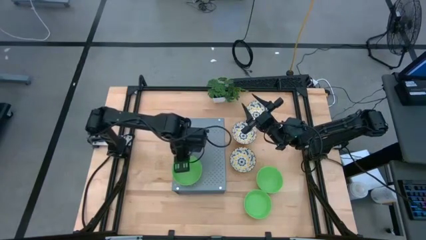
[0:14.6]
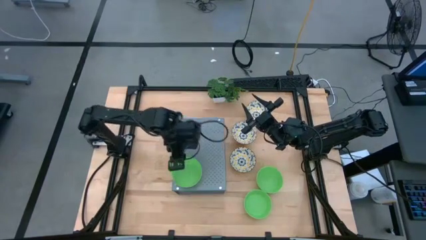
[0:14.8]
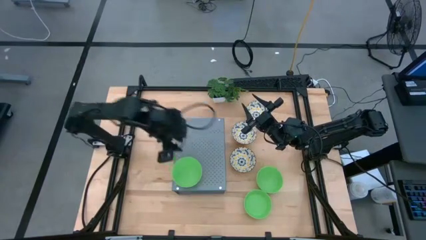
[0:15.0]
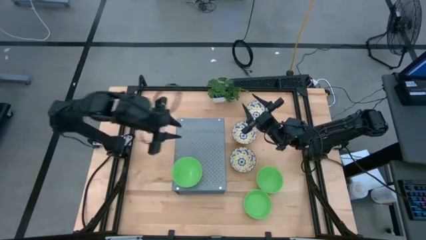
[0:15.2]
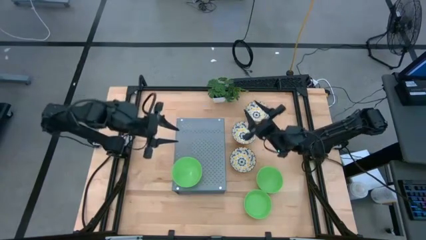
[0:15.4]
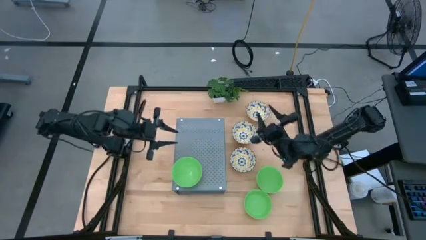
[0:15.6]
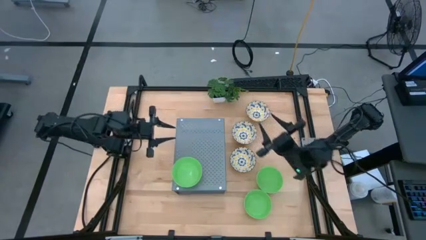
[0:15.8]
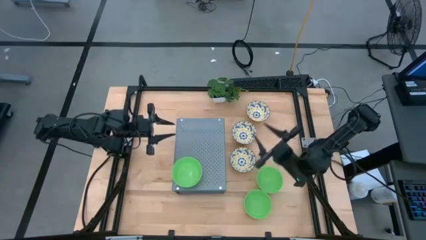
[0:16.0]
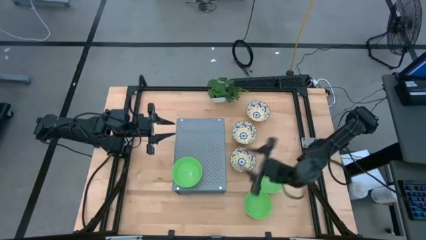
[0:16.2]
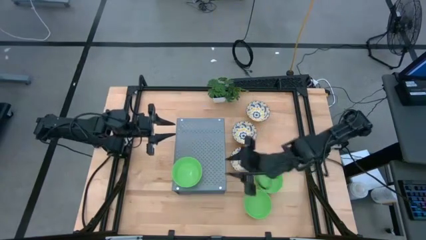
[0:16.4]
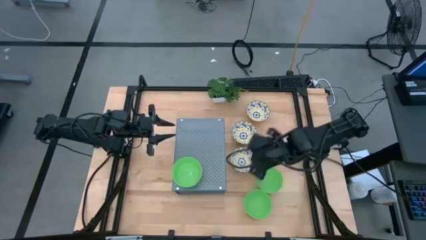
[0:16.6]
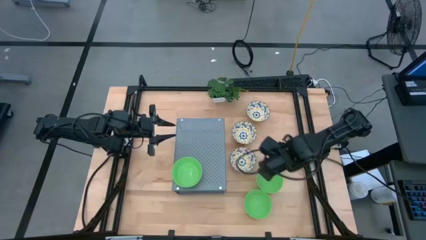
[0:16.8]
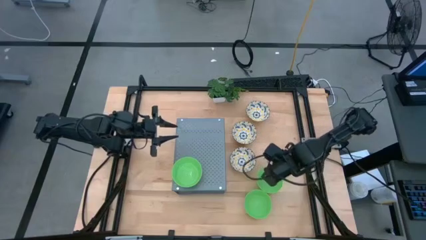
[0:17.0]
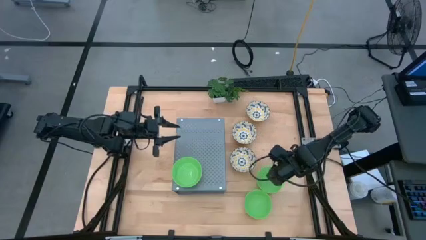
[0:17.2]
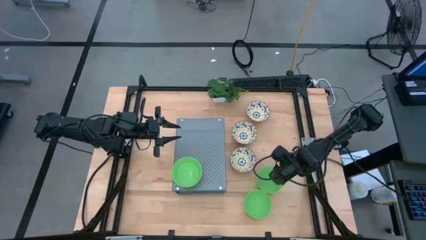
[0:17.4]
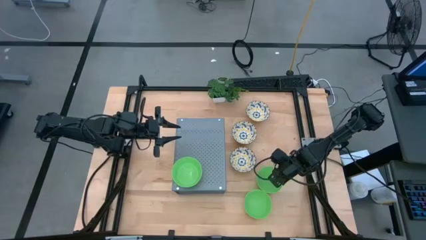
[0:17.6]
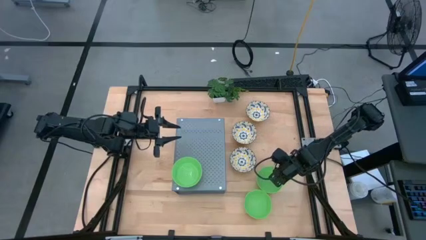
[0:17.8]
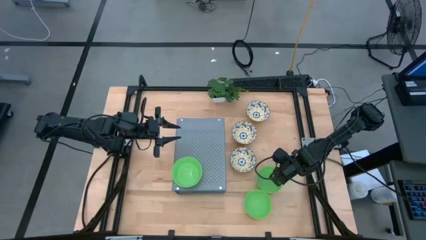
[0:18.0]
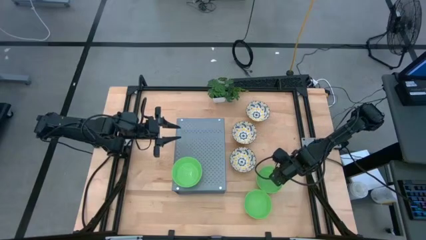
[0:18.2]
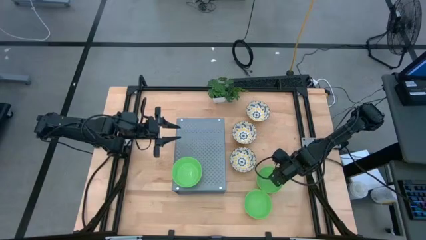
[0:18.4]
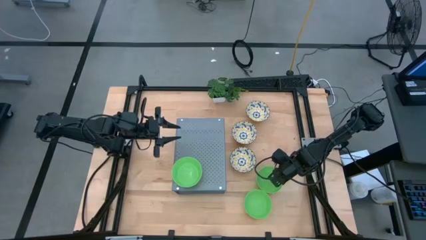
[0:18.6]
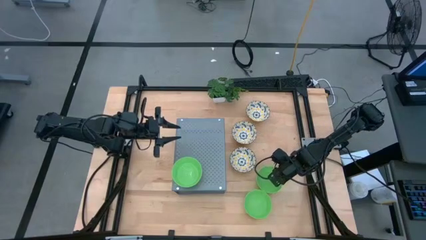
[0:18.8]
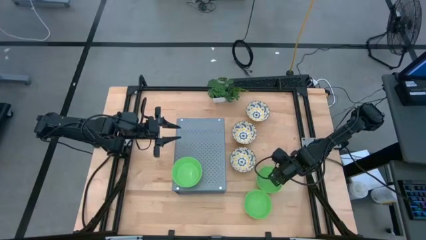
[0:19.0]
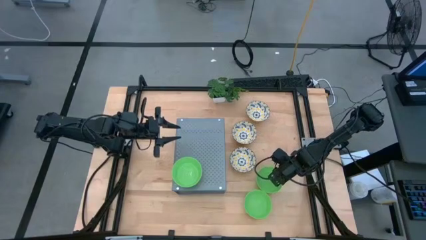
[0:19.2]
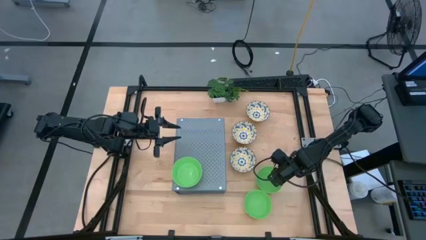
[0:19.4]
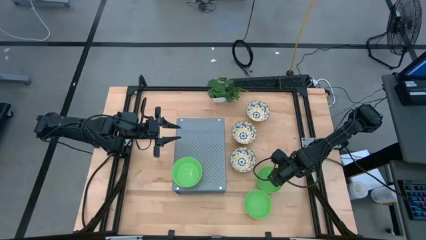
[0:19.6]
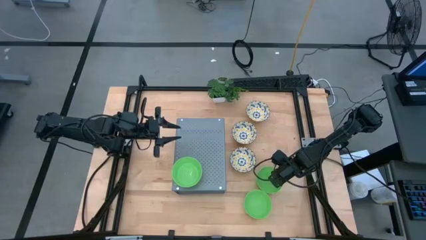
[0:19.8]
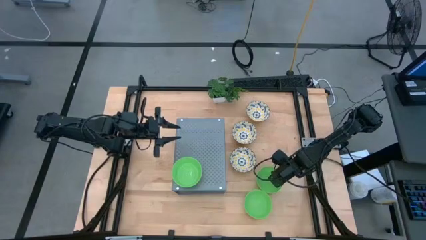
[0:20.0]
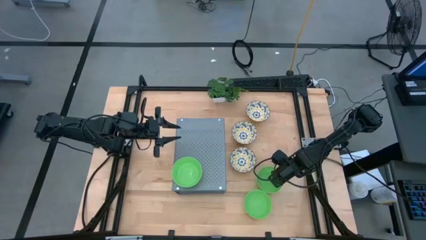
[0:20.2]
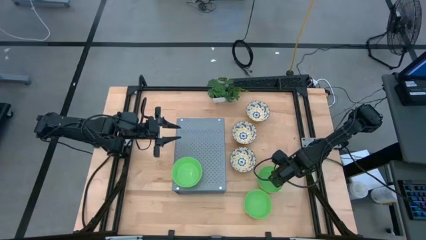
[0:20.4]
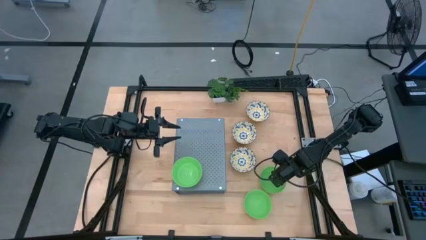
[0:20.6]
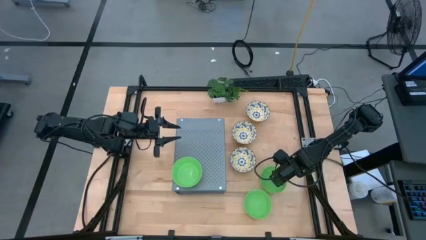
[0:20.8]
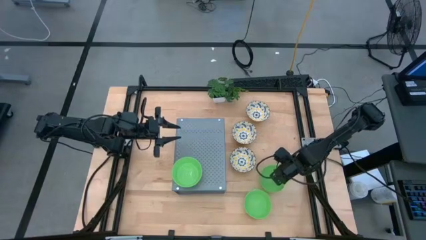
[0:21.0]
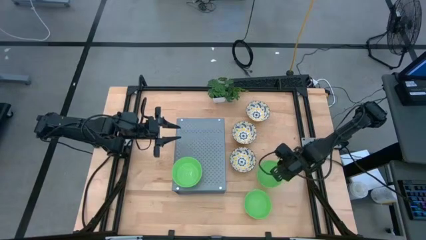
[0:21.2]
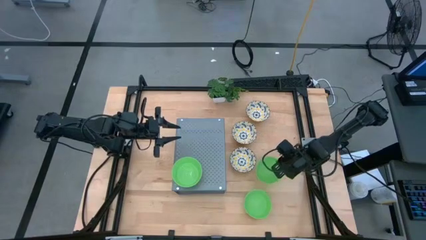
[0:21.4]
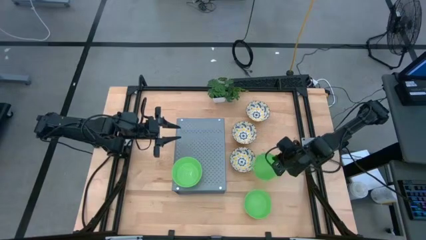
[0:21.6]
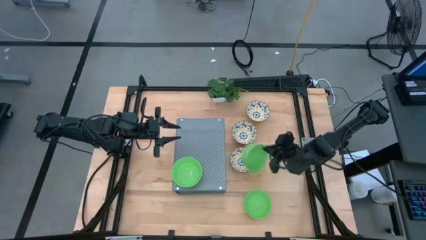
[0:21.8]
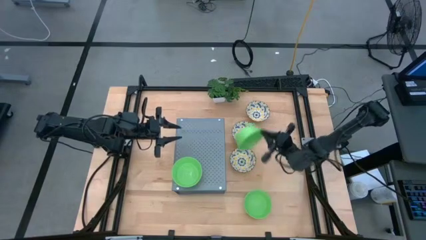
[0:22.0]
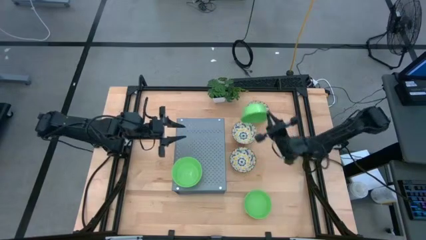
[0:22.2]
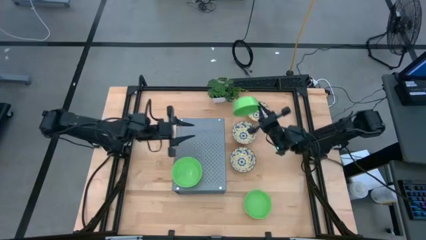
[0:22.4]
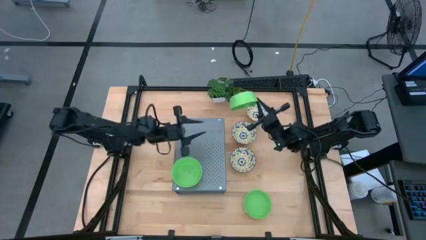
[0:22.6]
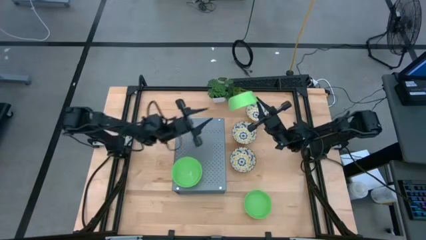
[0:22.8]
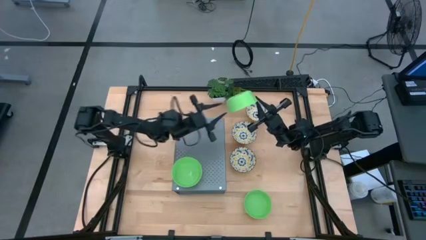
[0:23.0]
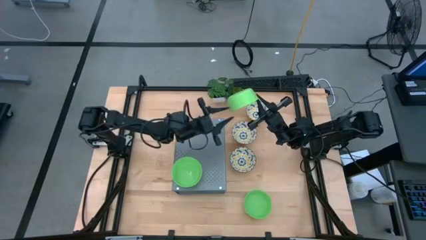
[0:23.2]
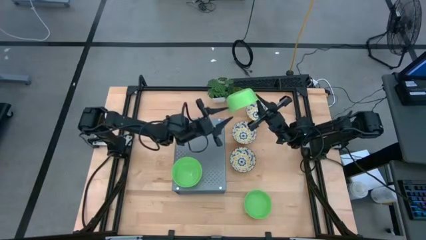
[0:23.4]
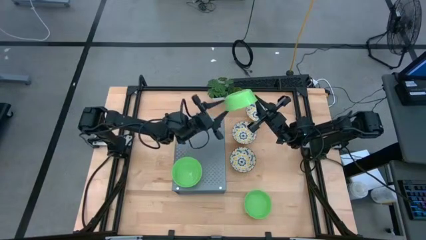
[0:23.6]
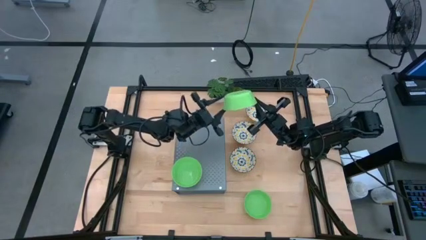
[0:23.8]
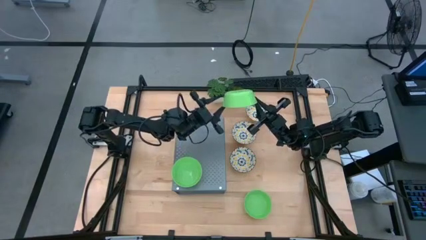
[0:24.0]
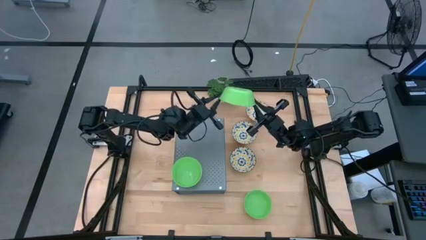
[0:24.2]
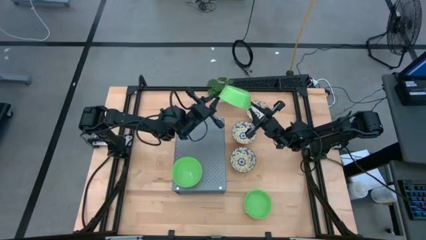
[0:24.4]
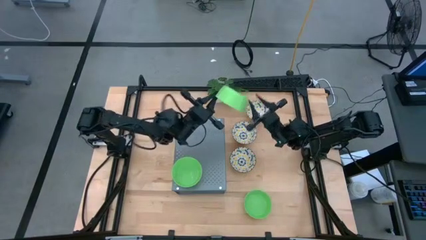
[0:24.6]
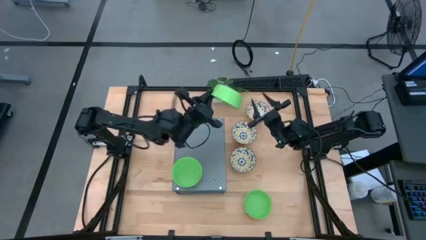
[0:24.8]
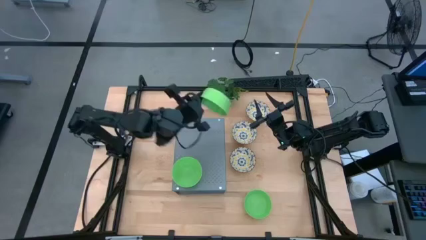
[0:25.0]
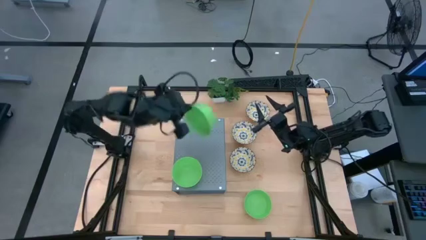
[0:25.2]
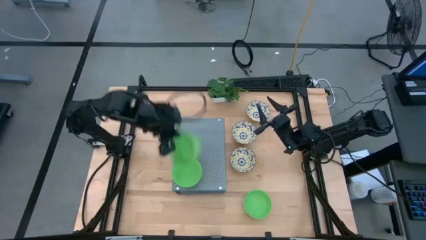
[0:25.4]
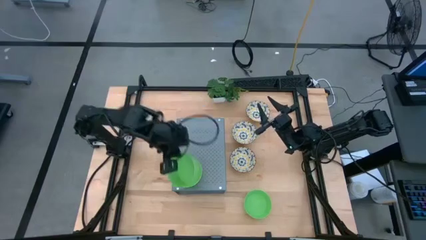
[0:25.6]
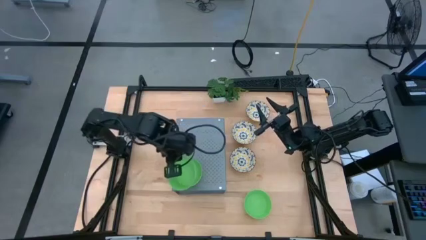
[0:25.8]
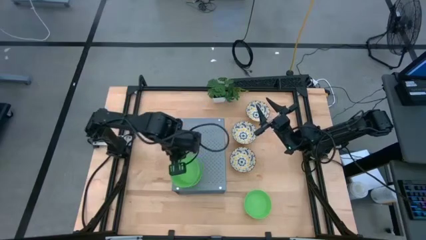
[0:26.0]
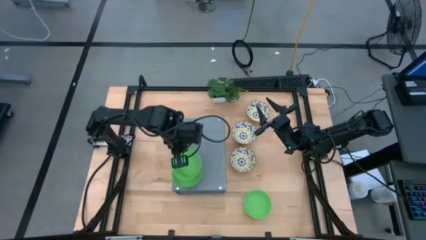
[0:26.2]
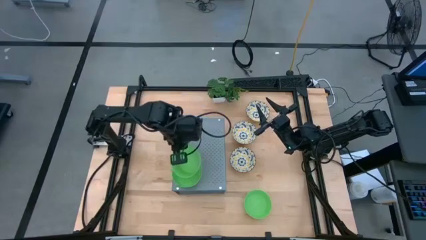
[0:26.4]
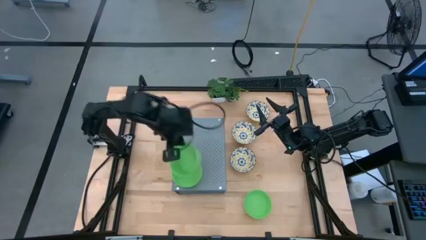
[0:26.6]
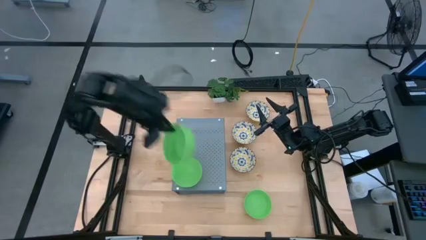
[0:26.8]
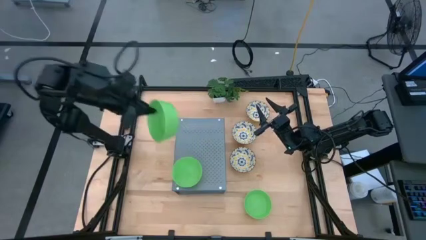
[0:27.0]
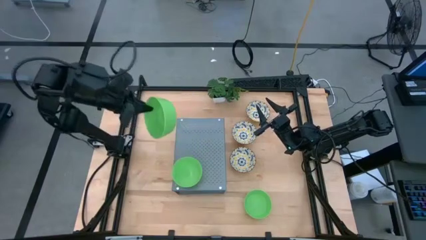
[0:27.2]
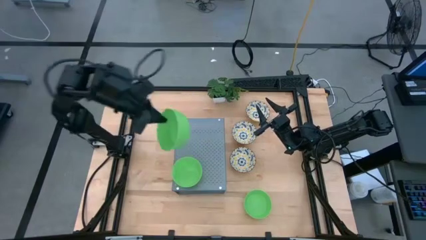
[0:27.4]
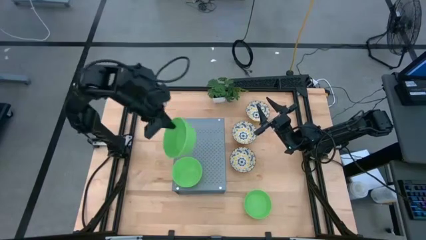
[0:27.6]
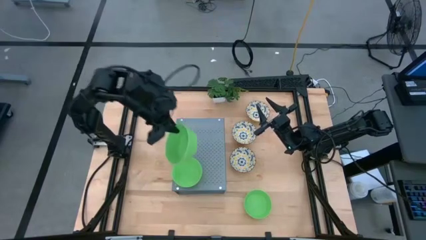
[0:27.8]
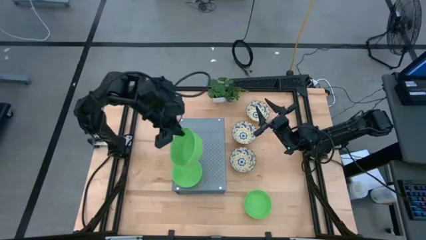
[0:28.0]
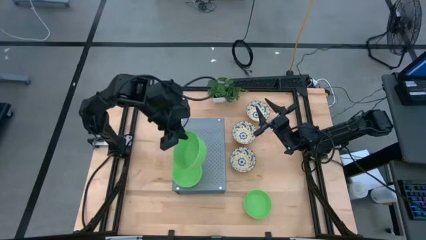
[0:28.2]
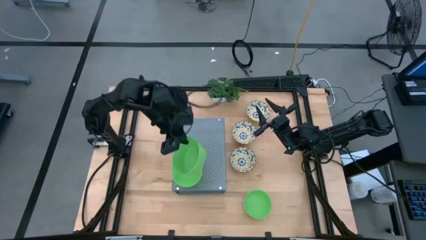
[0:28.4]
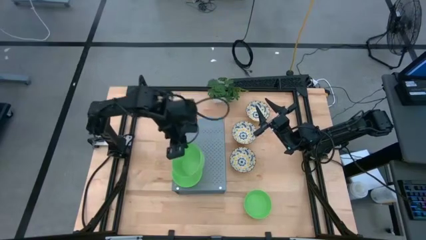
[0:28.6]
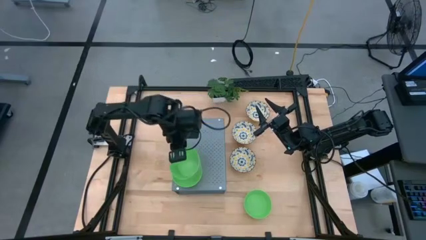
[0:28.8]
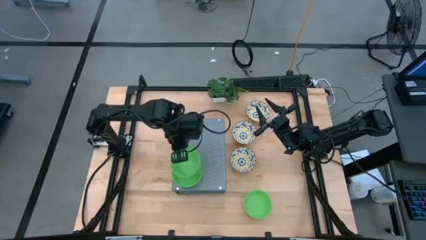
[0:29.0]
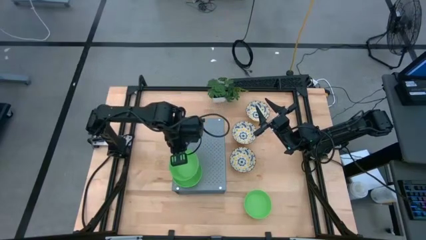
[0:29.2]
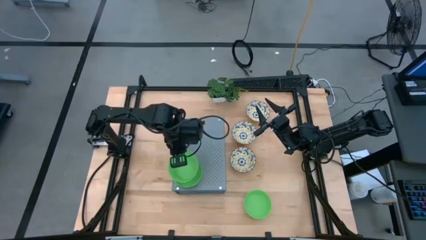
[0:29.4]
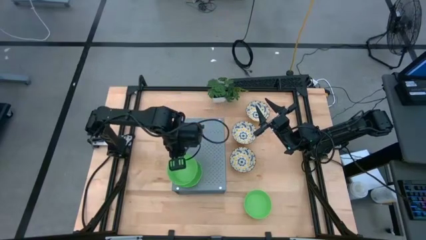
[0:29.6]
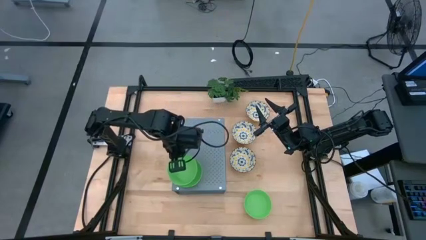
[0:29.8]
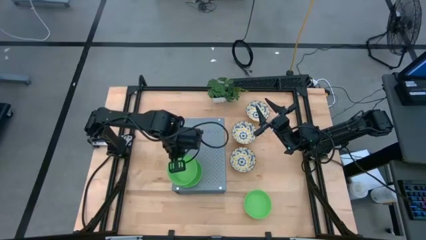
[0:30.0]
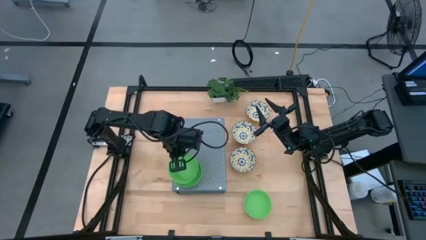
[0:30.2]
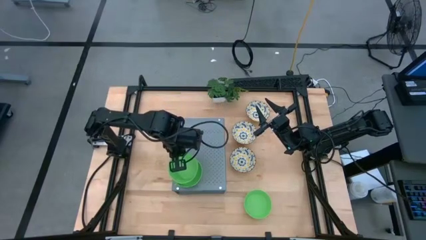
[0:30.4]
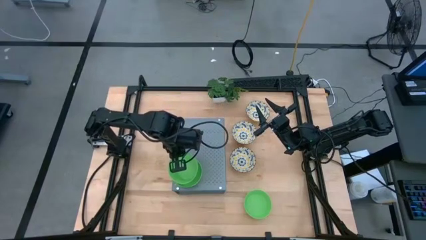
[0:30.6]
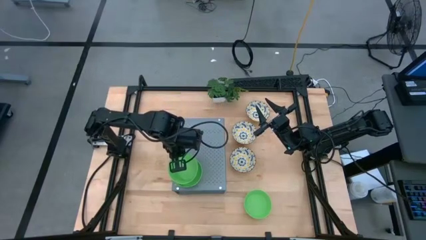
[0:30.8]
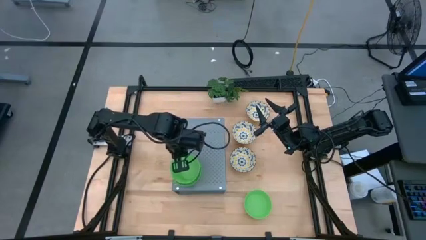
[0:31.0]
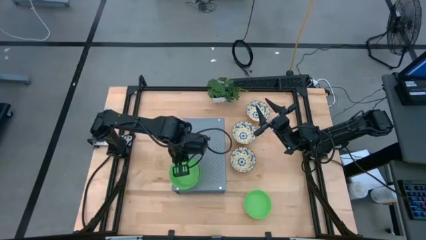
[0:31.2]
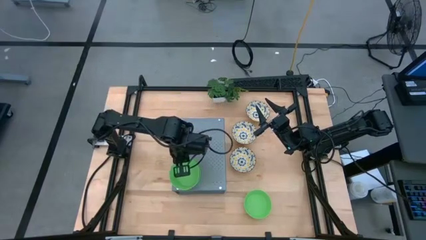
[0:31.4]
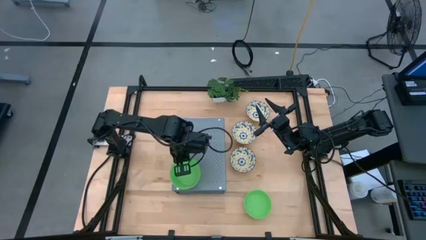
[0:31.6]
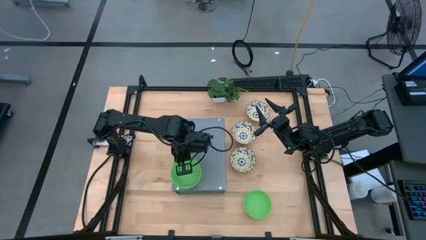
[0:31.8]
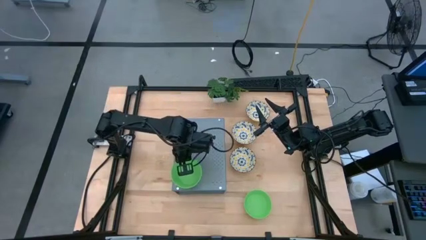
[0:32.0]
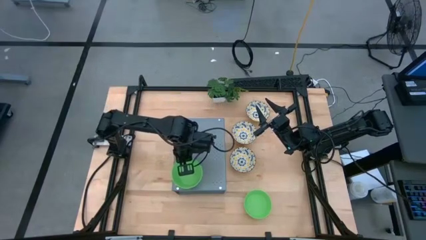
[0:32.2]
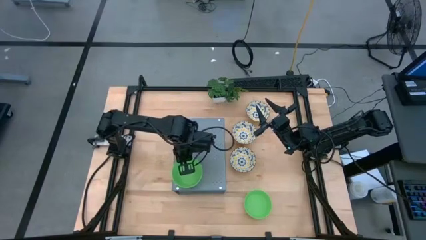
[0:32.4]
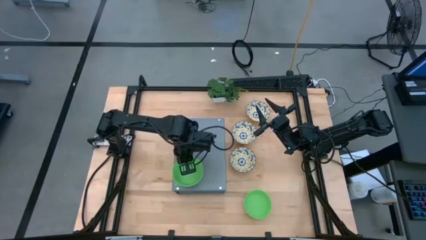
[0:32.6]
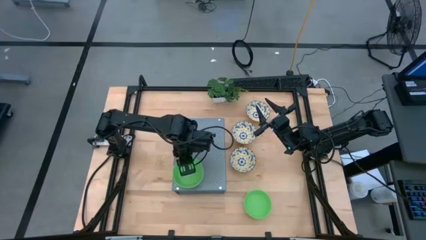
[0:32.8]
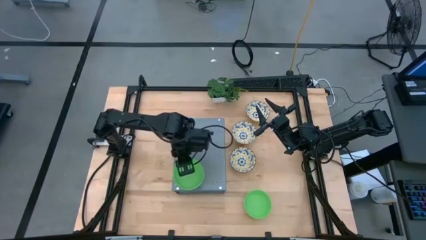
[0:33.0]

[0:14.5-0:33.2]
Task: Pick & Place Mini bowls
Stack the top green bowl on the green bowl on the shelf
